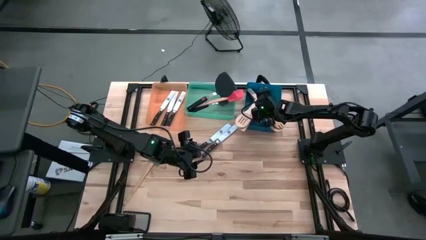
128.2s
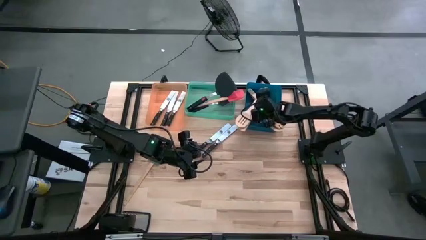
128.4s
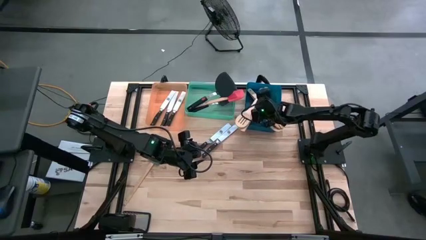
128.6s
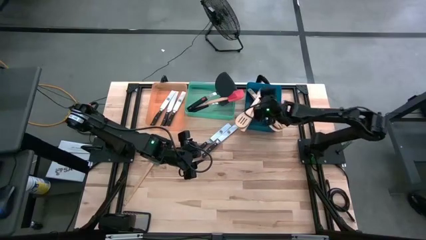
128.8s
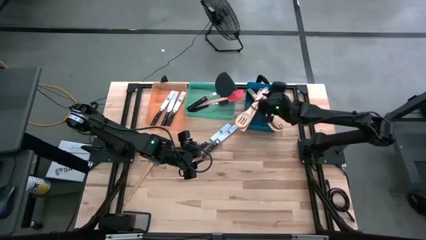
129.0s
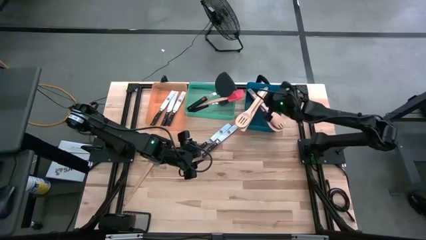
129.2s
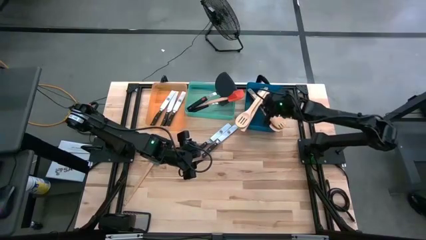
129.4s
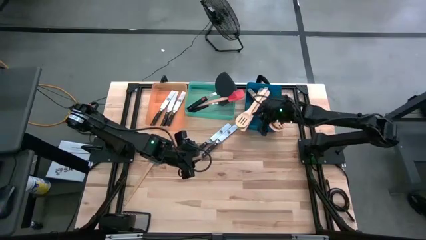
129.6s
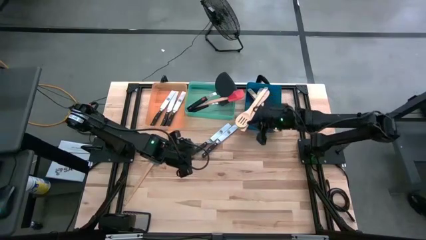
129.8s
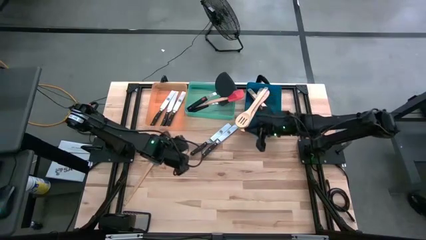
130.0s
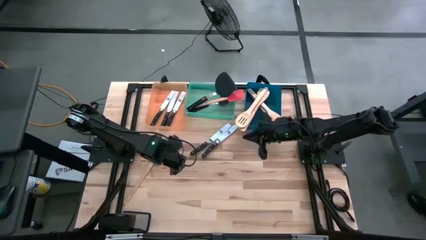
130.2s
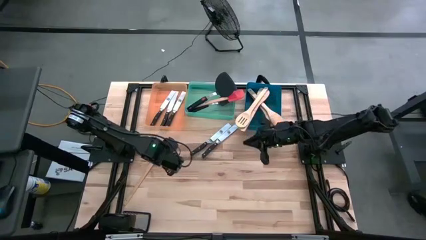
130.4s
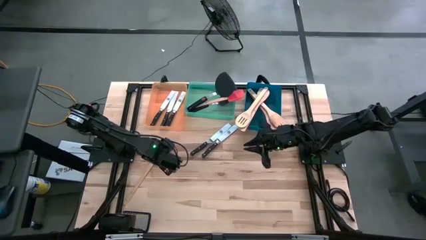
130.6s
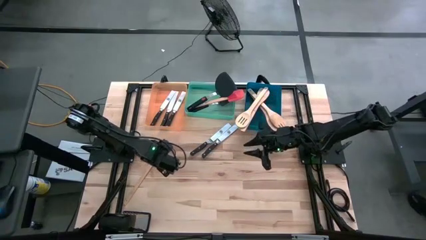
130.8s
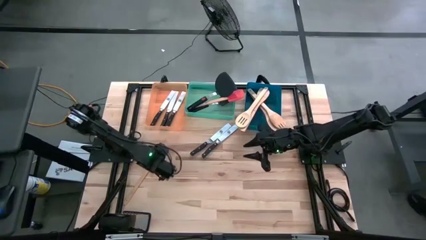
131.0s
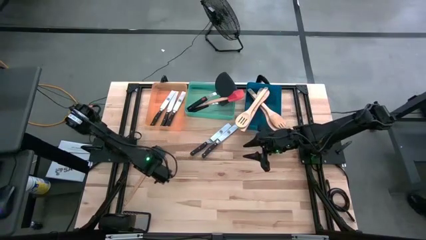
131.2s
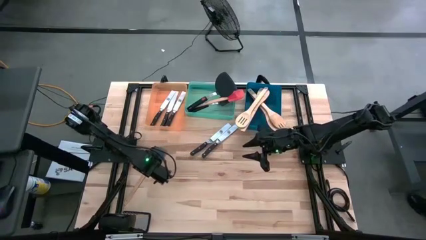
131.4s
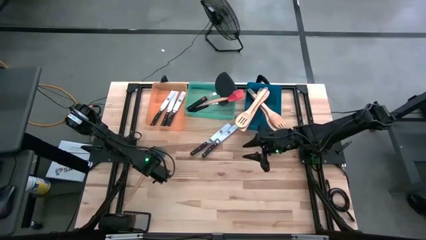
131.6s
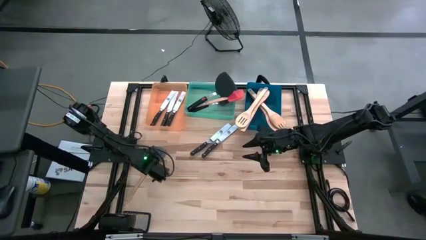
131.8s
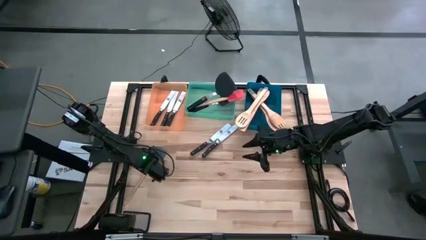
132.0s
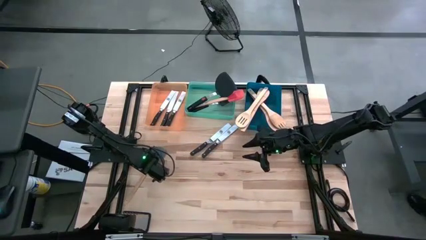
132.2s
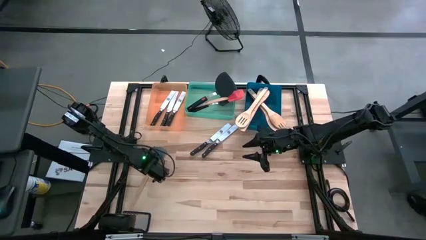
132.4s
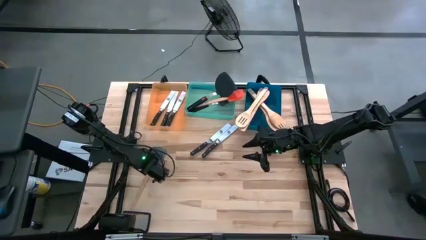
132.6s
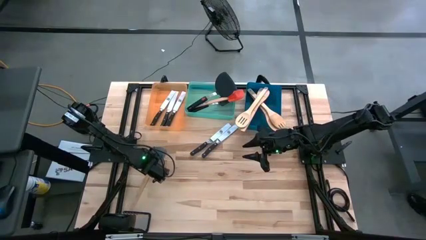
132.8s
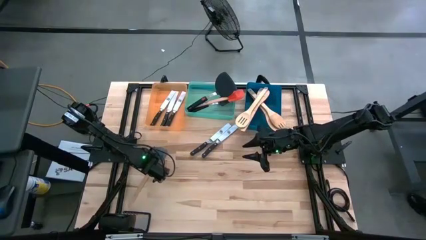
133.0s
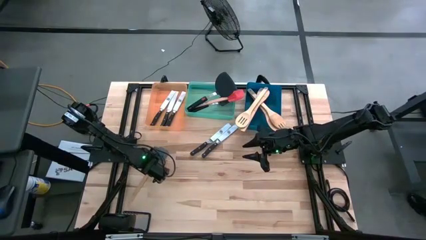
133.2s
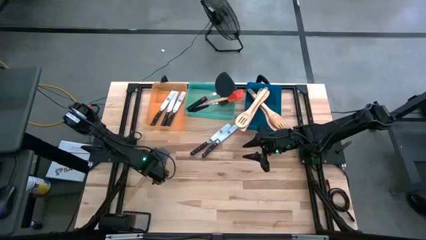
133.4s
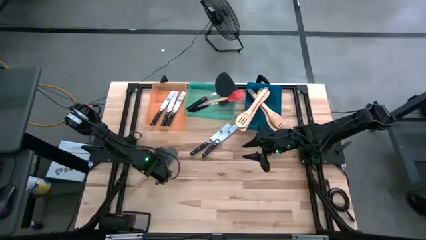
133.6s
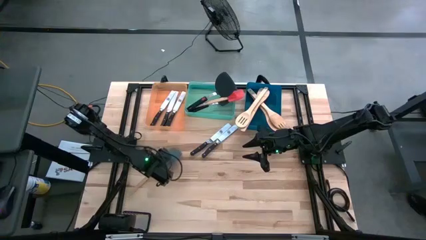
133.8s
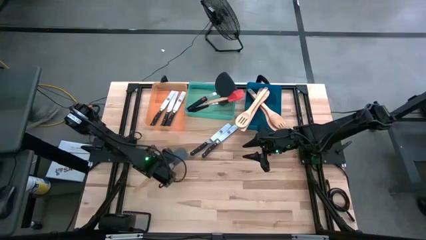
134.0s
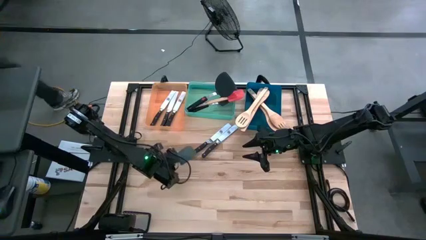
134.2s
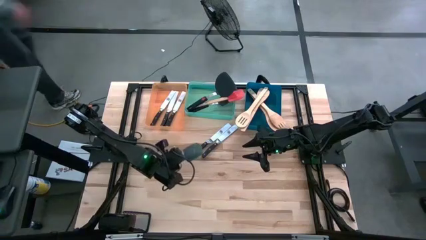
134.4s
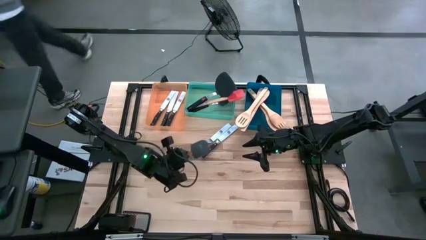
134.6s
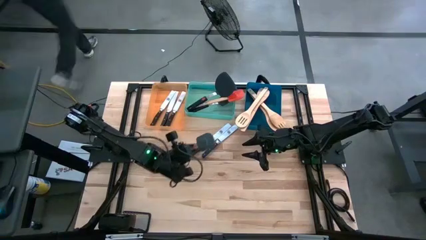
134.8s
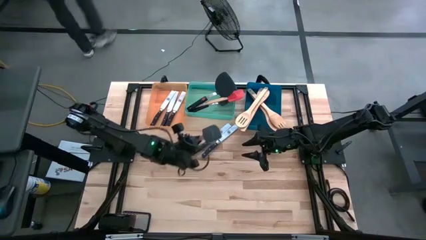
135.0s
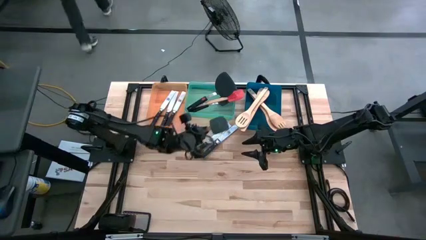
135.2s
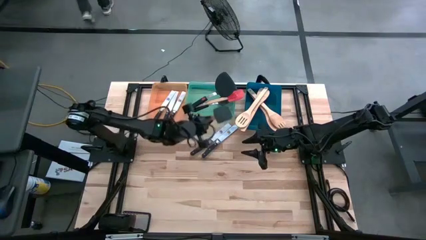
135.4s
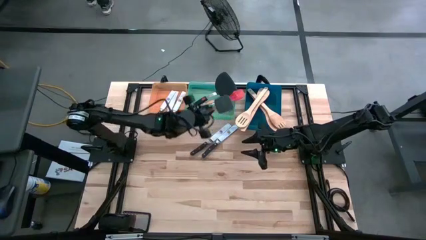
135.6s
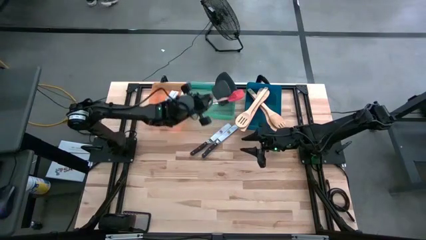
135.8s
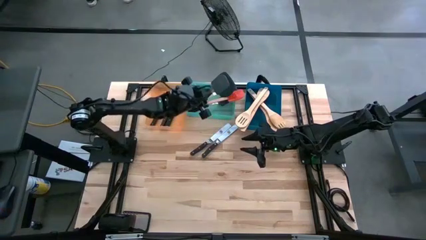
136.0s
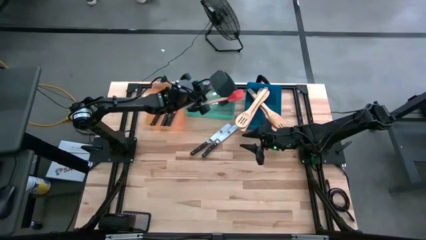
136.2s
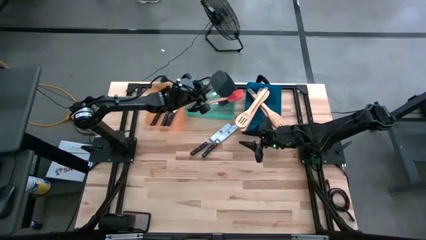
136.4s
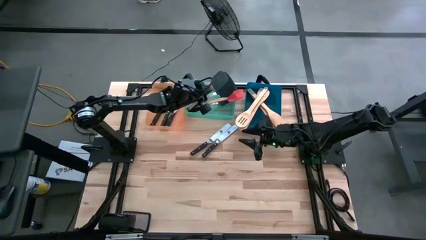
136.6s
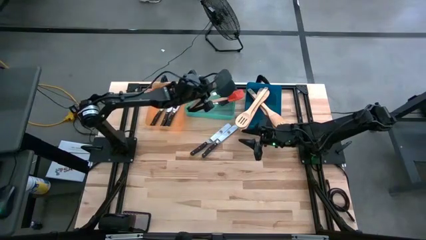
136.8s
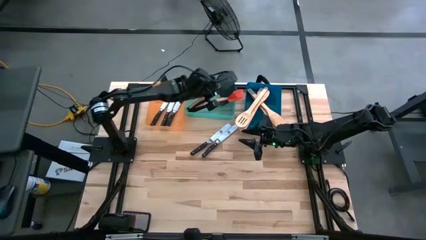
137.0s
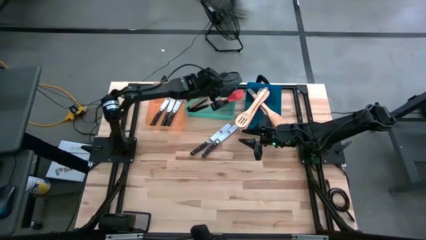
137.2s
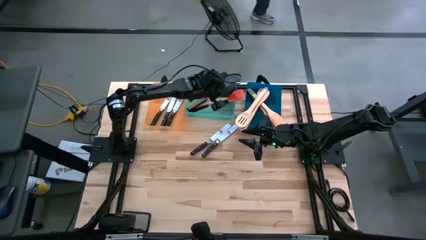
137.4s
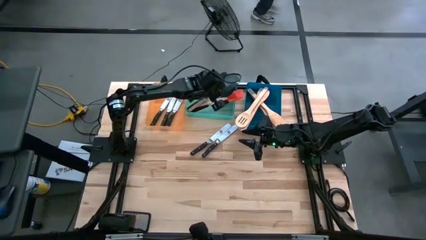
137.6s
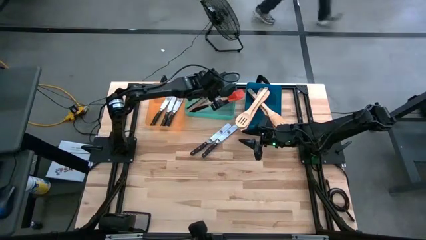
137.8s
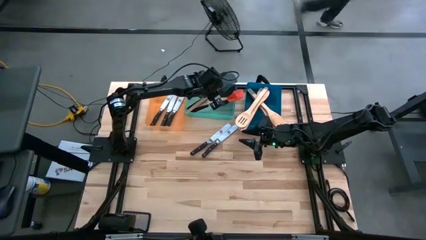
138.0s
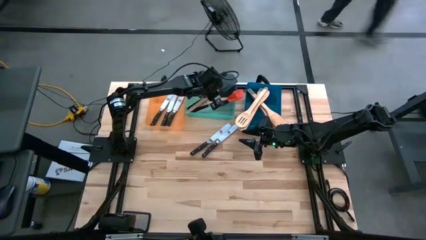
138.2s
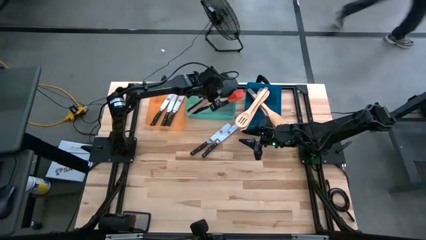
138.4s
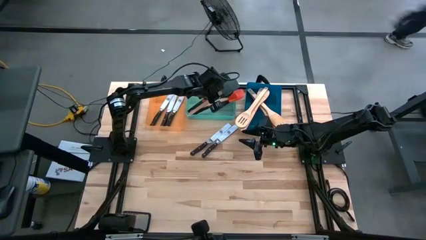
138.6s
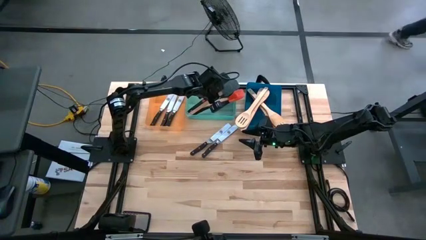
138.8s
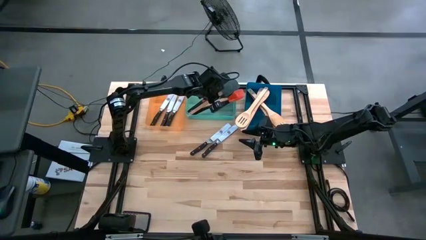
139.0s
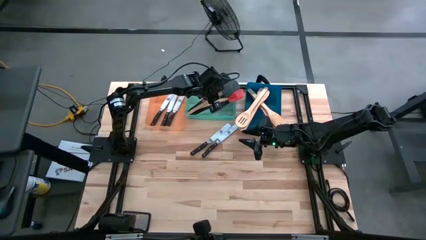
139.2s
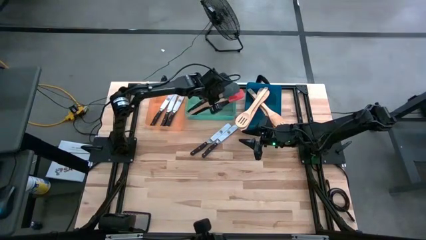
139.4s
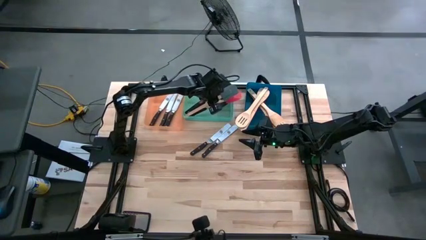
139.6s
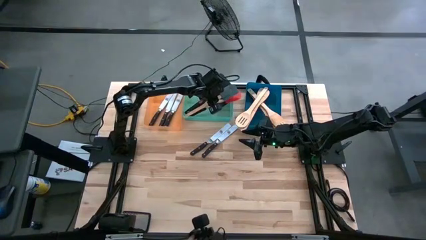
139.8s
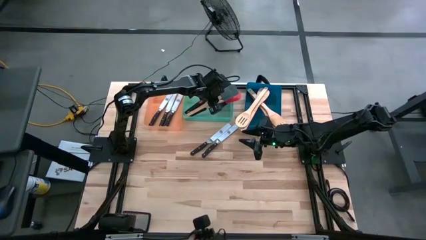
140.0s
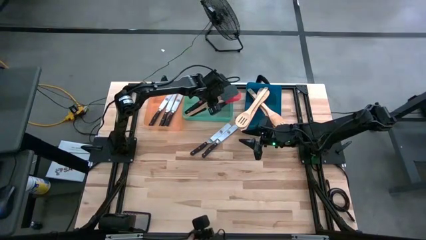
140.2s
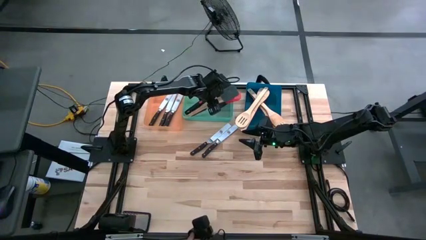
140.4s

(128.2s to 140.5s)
Task: Pick & Place Kitchen Items
Put the gray spatula into the green bin

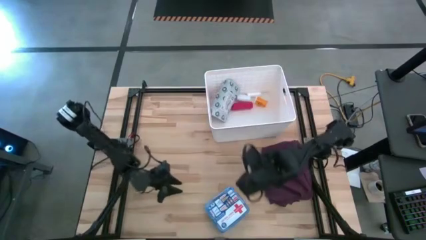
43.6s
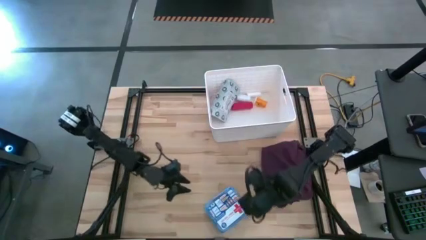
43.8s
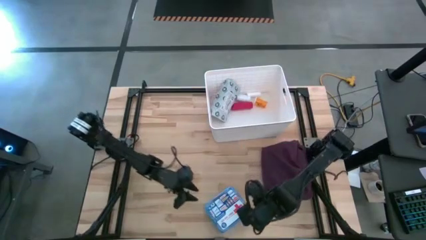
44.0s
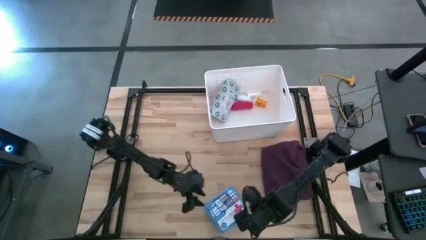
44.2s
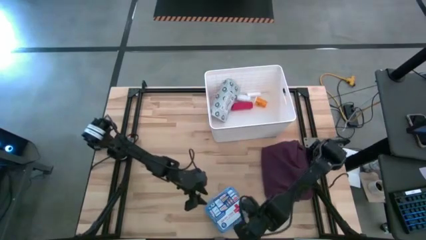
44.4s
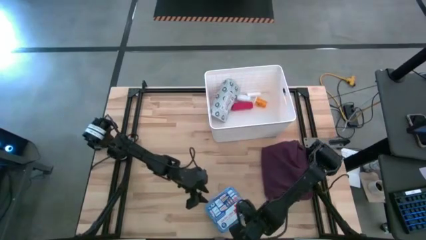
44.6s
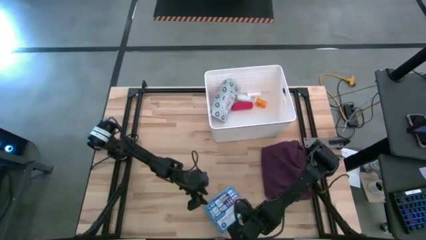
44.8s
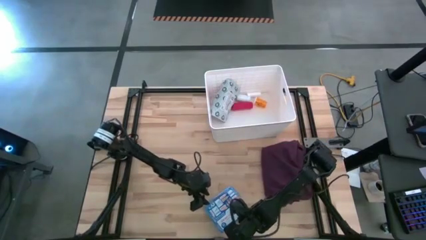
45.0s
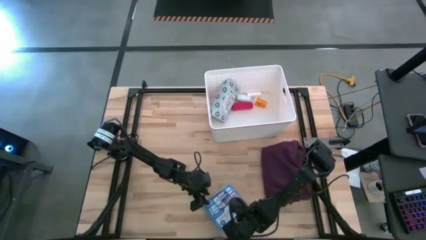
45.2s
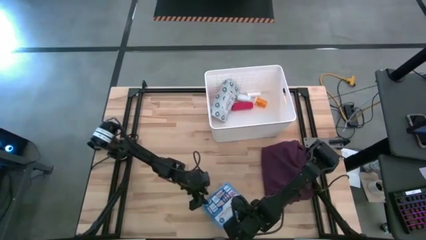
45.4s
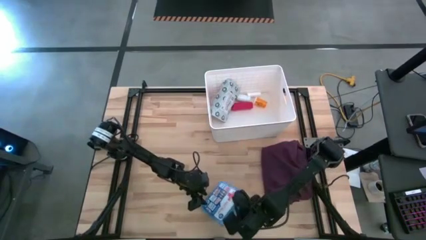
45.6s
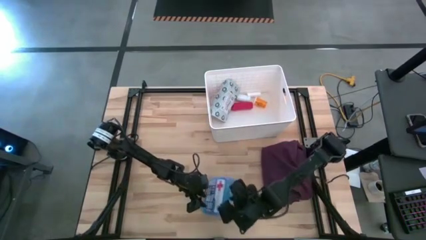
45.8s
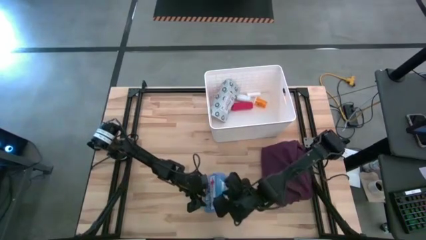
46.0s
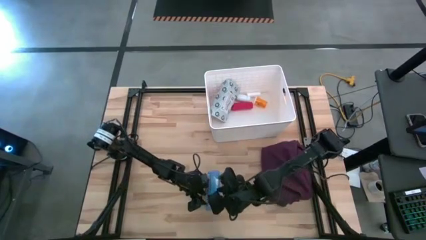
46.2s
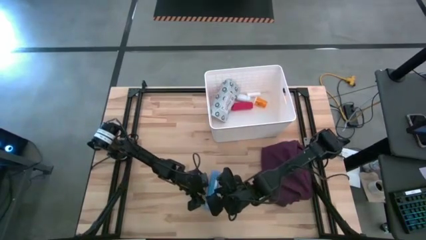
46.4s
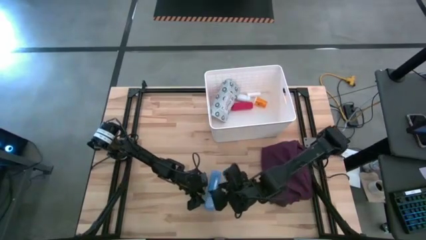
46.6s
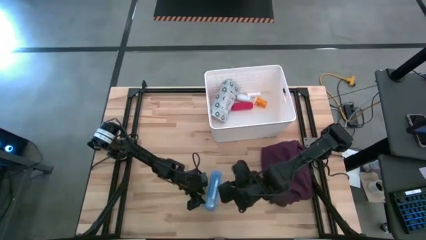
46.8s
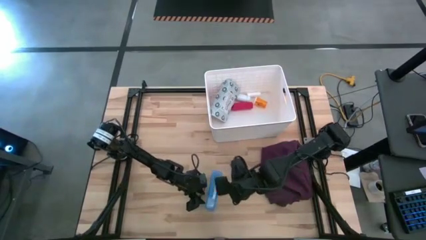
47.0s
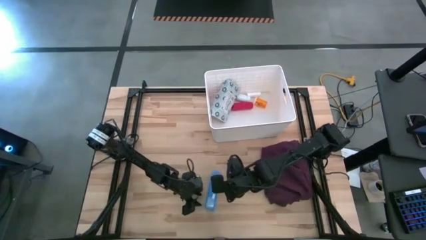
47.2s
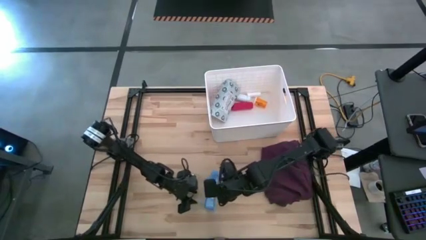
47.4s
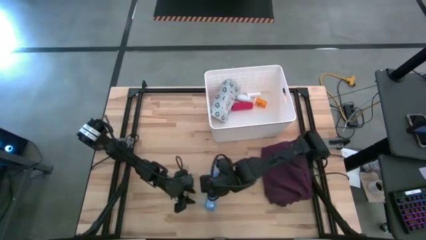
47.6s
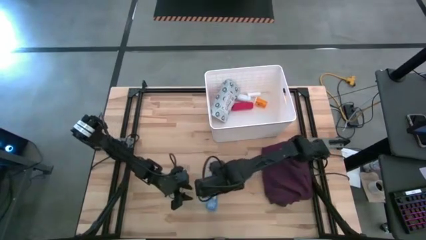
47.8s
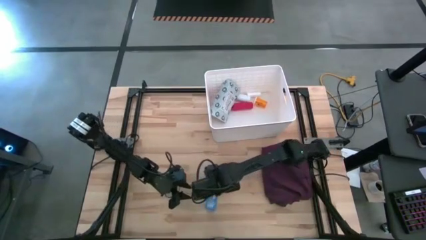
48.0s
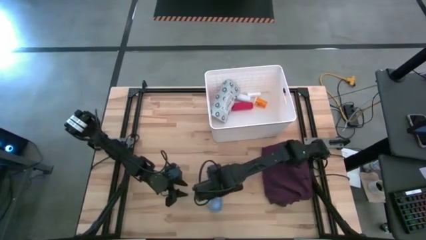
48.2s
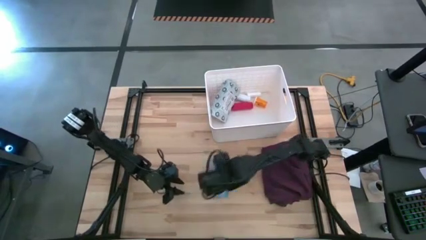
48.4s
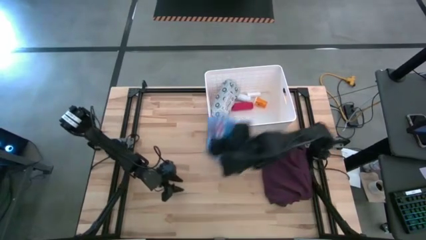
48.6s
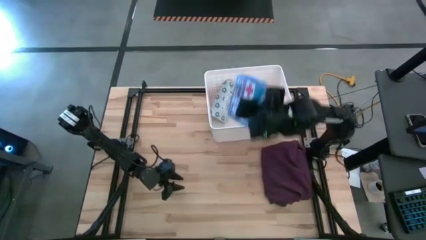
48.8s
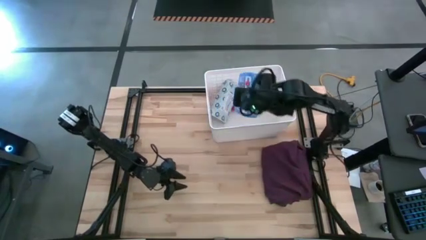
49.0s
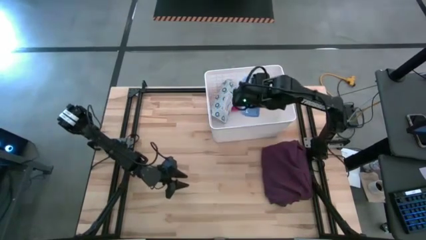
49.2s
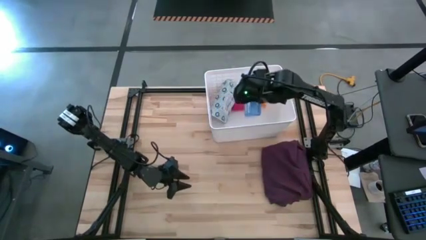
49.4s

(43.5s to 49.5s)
Task: Pick & place medical supplies in basket/bin
Put the first aid kit into the white bin
